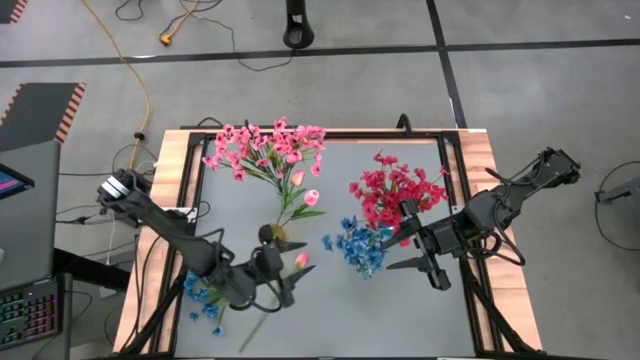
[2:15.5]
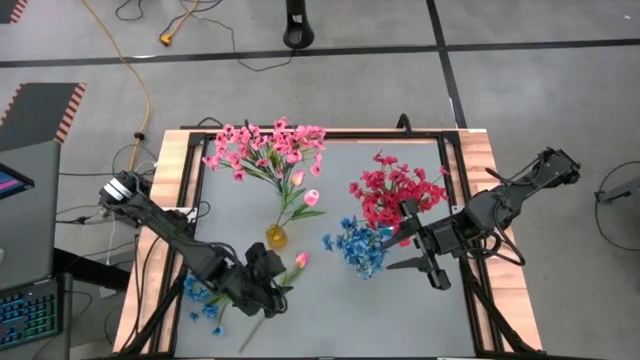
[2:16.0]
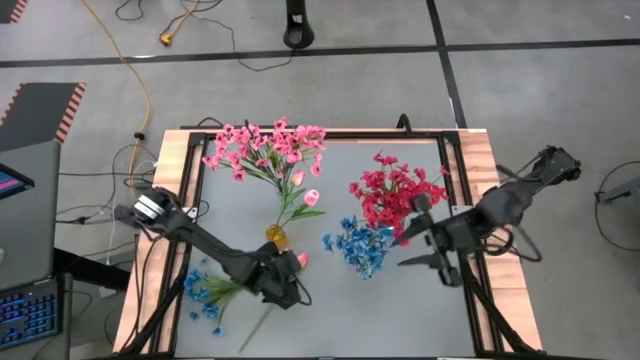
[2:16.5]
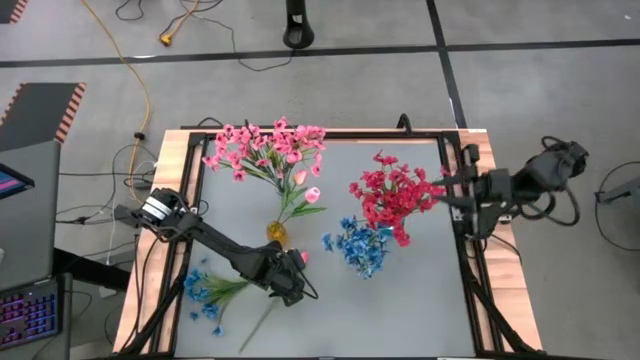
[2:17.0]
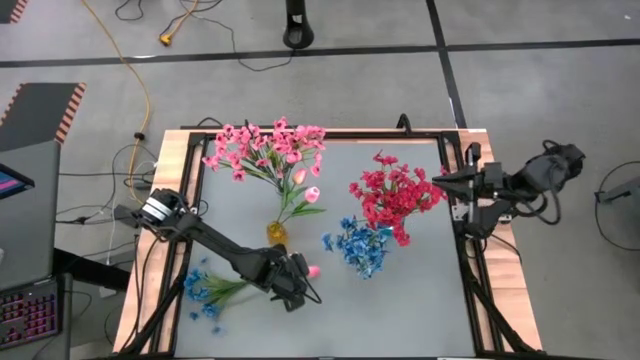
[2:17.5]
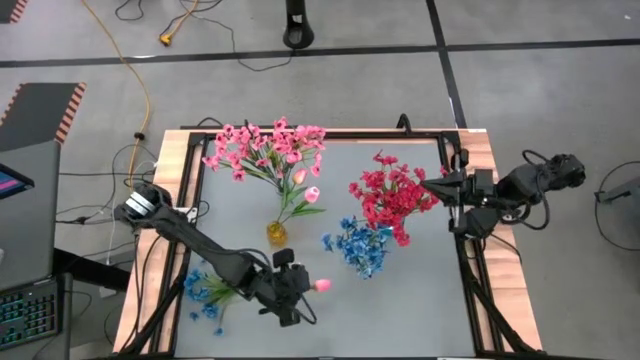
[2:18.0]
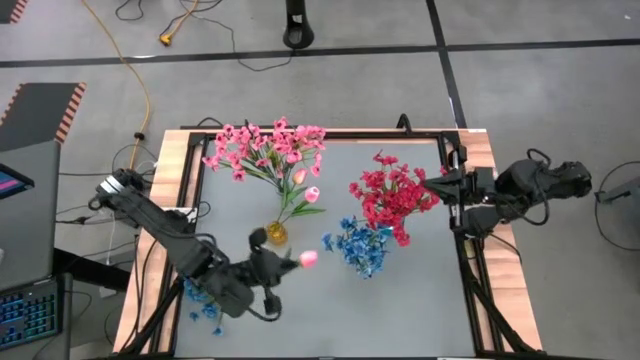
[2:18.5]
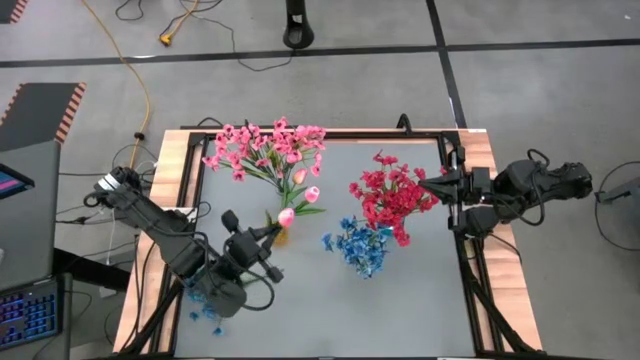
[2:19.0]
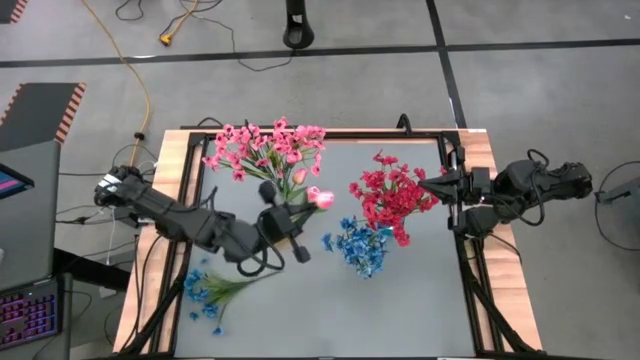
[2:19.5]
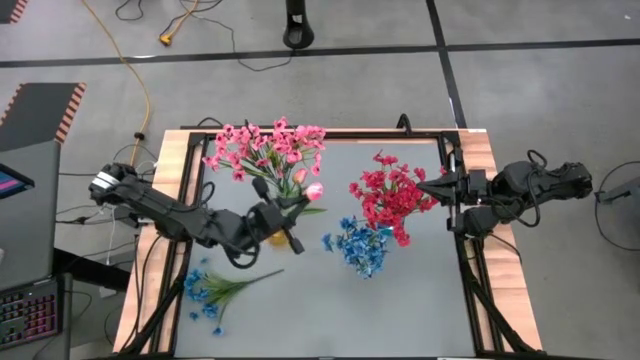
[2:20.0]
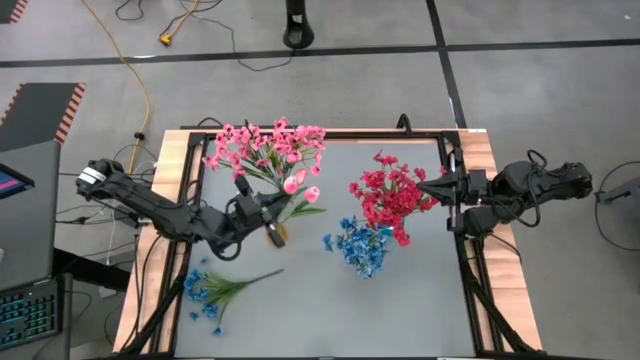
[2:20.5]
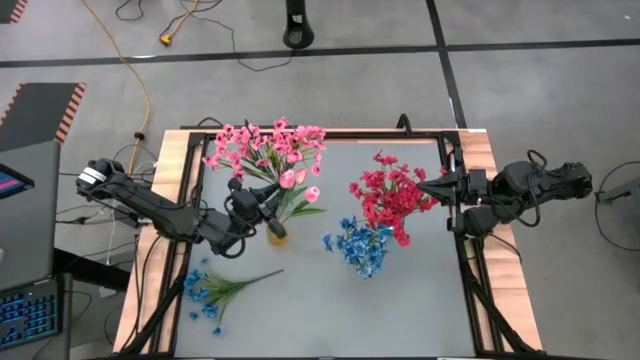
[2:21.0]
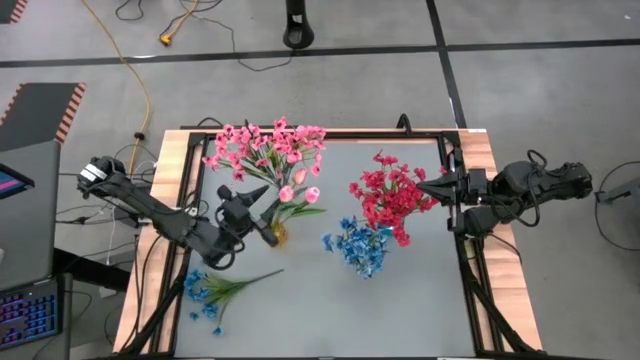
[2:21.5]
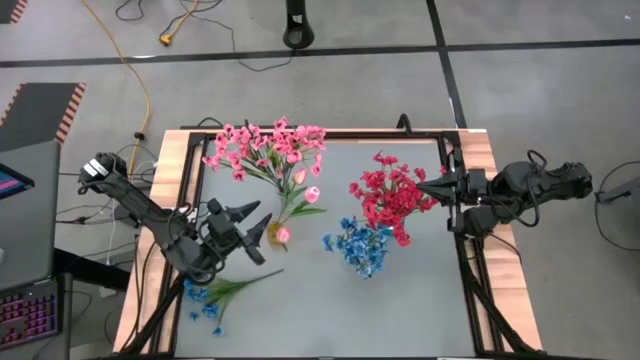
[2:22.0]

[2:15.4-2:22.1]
Task: Sort flowers into vase by color
Put the pink tulip into the yellow vase

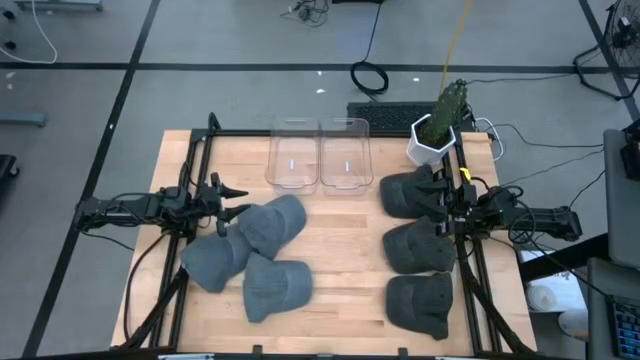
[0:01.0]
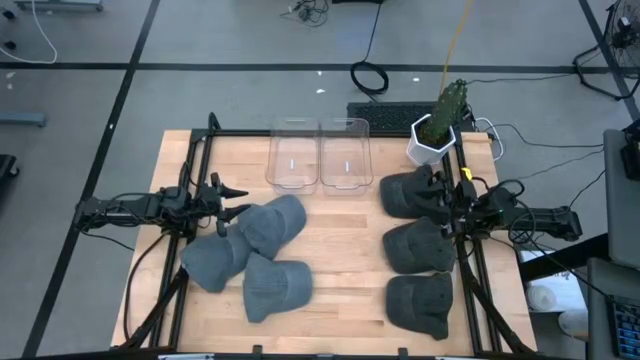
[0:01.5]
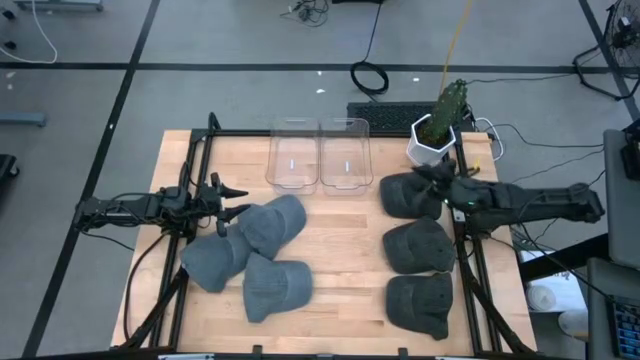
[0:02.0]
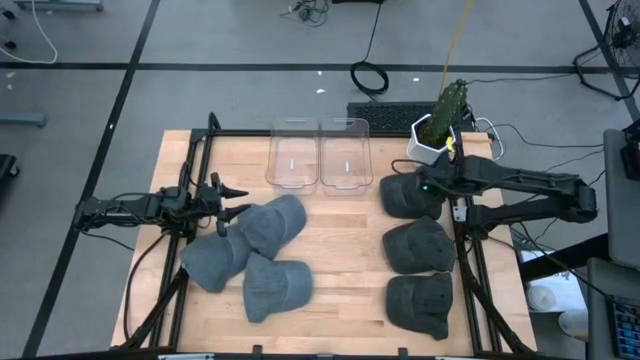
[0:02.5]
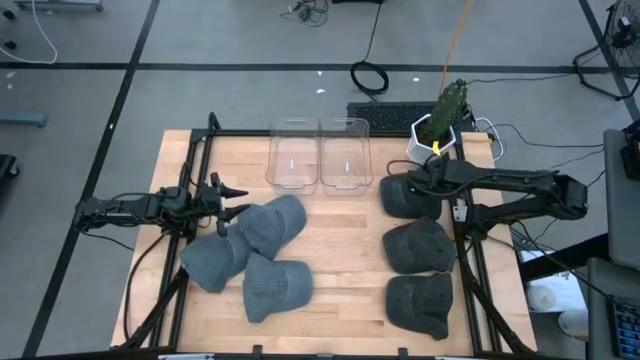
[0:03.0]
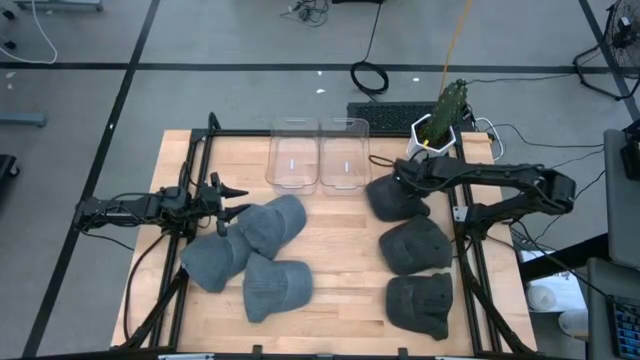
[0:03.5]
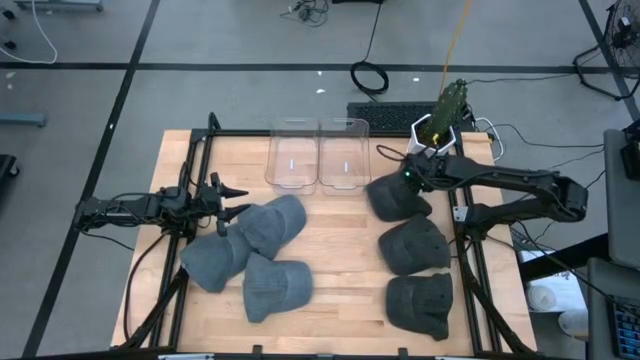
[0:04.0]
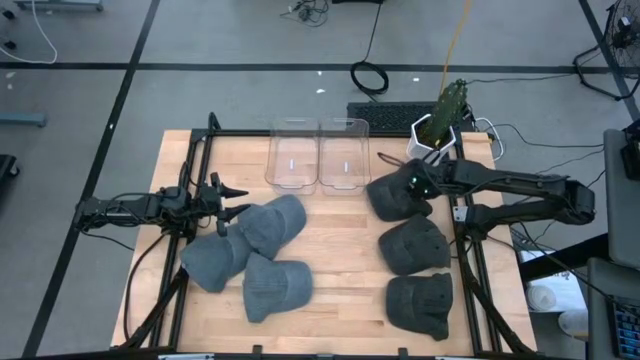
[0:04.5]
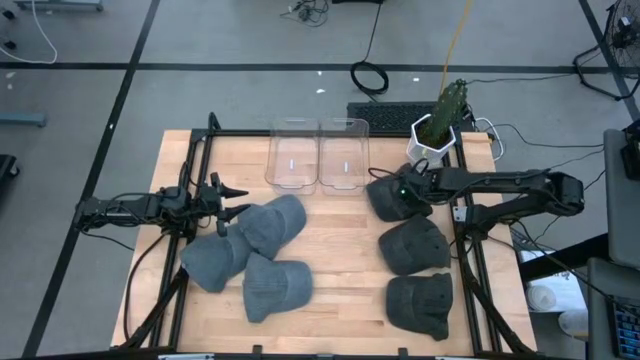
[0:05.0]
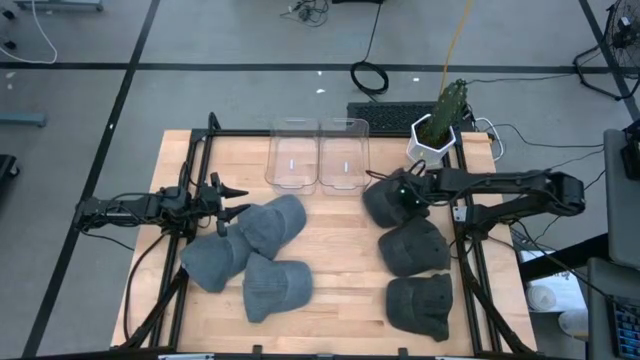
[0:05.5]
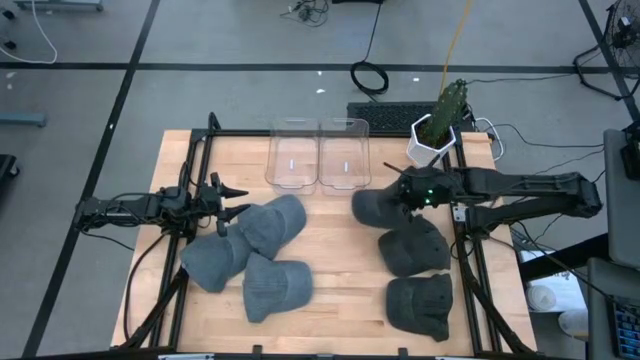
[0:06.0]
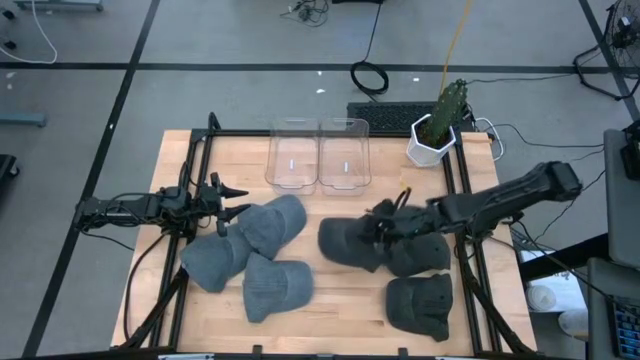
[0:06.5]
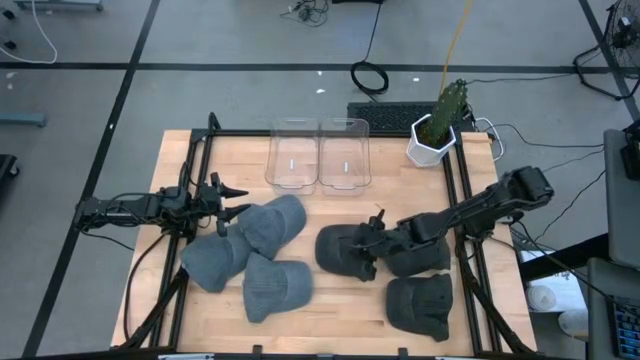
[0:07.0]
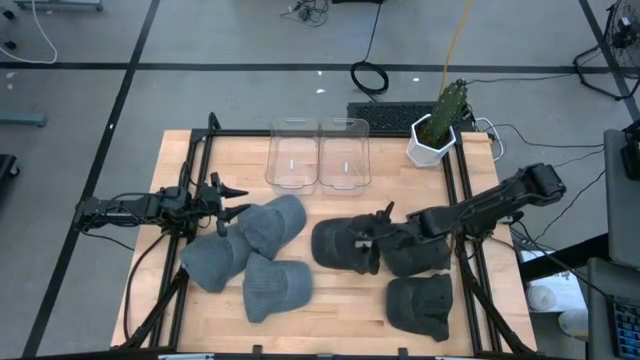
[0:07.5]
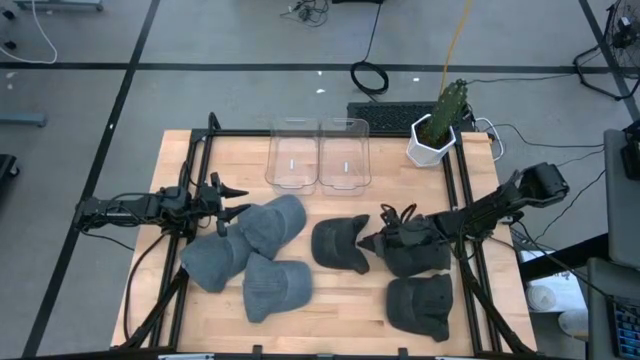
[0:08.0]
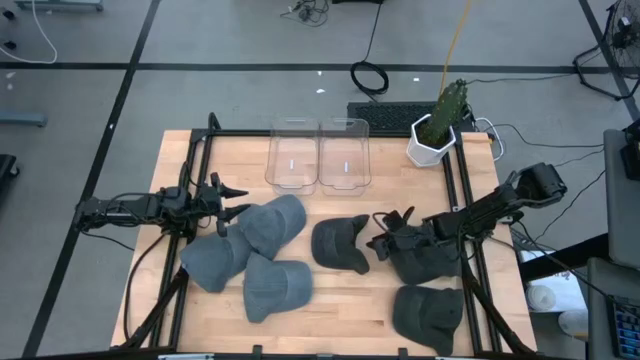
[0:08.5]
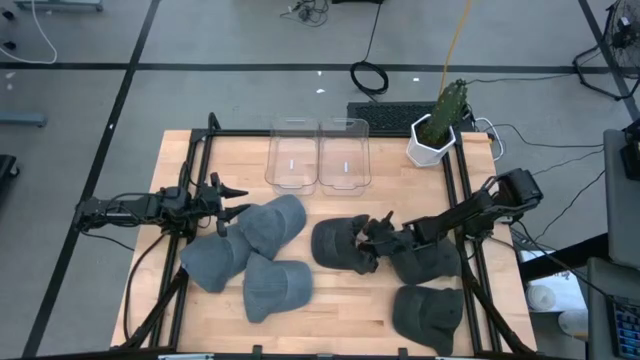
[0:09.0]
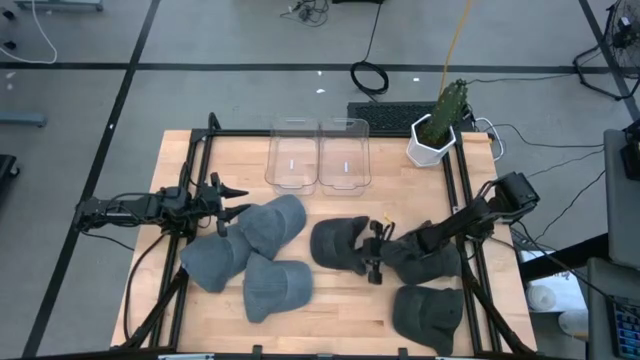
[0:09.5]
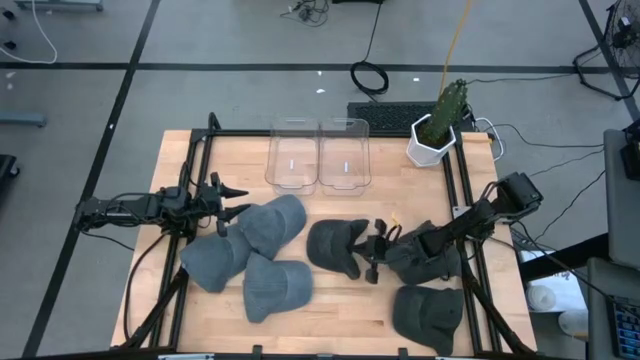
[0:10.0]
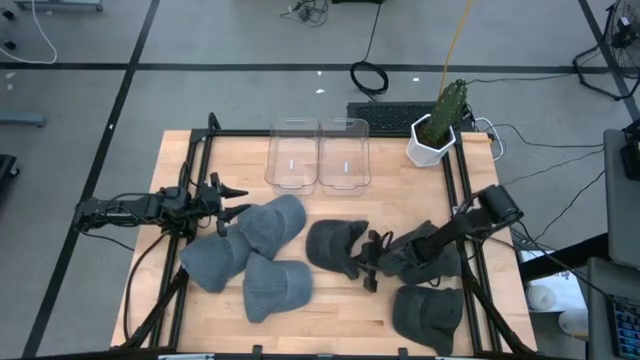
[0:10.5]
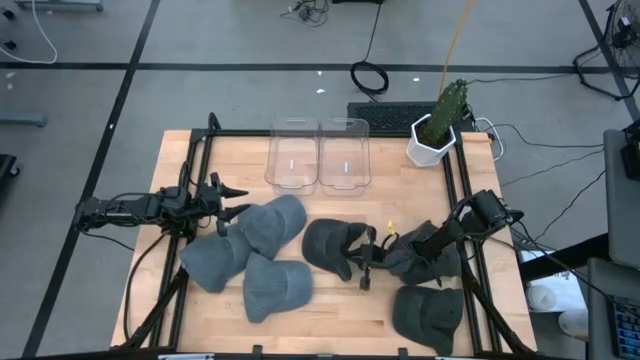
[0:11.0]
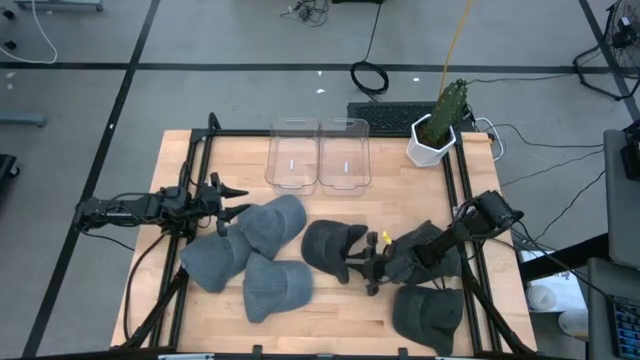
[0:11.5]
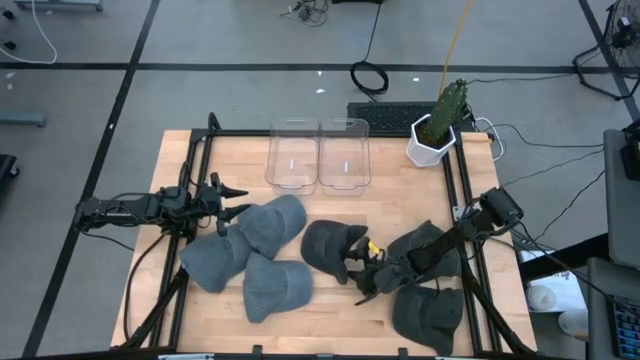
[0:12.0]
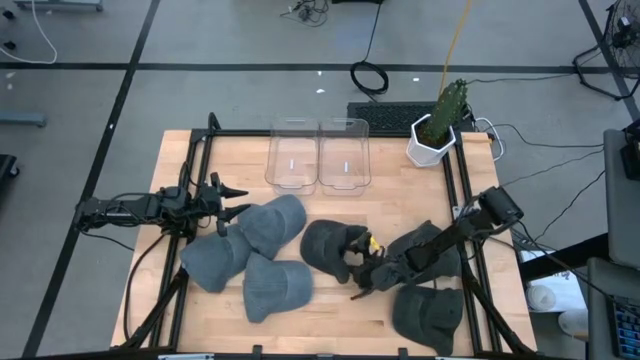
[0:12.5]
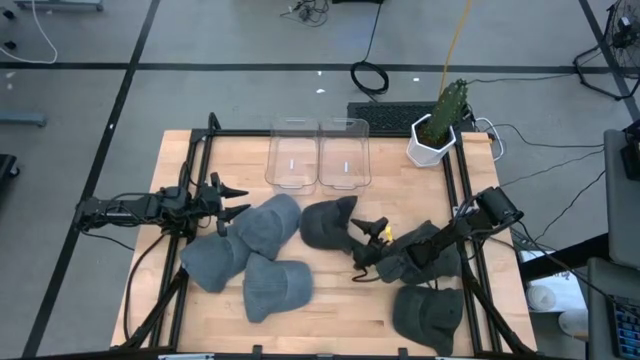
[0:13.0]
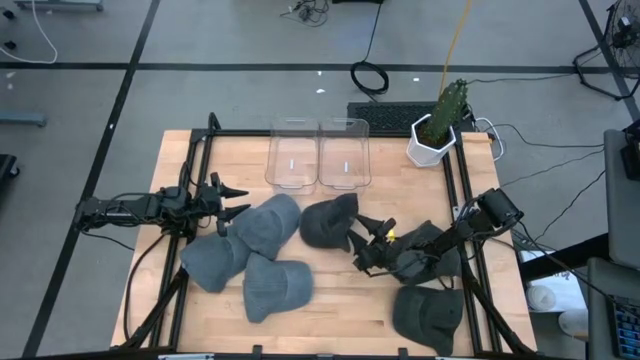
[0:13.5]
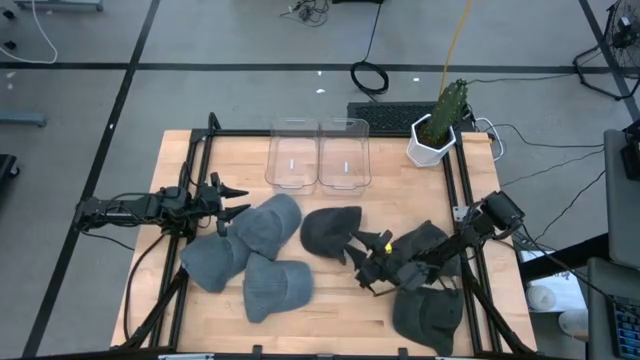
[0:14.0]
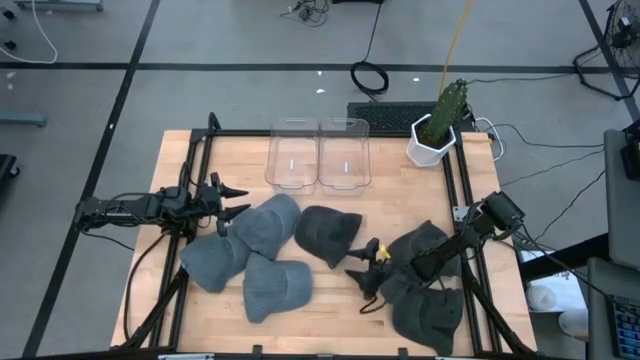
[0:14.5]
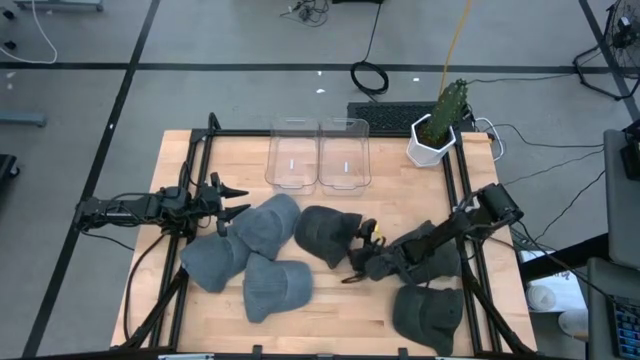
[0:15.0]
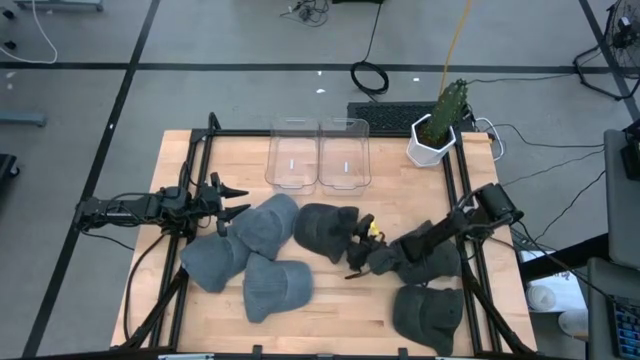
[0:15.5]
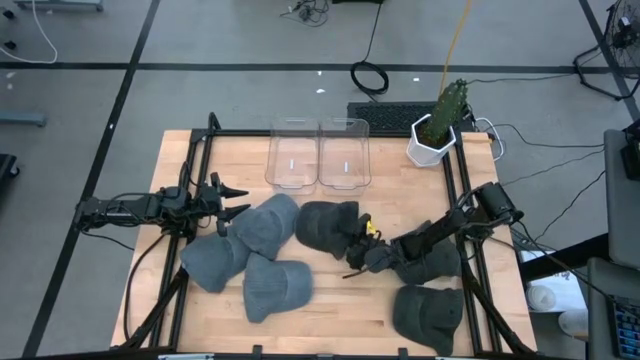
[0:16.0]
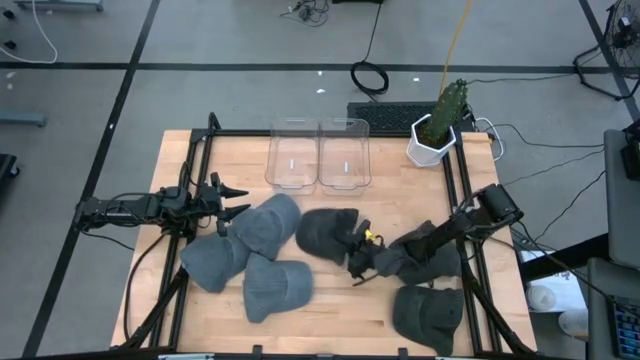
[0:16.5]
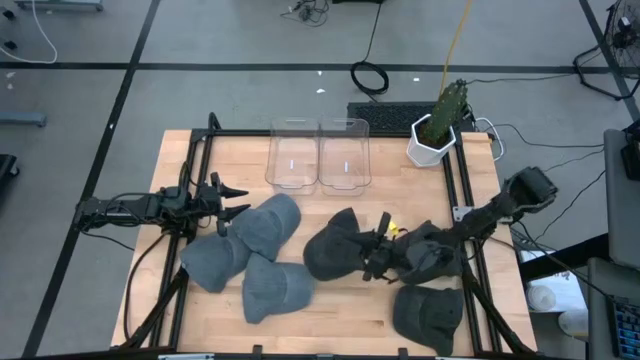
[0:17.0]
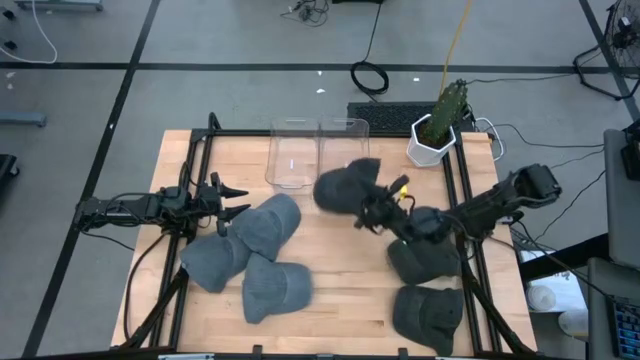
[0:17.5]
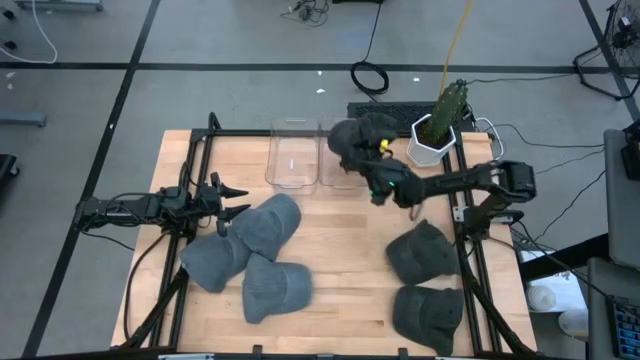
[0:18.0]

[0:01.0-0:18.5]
Task: Pick & Place hat
Put the top black cap into the left transparent bin
